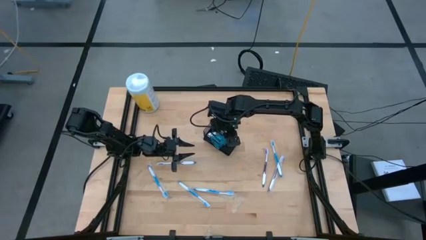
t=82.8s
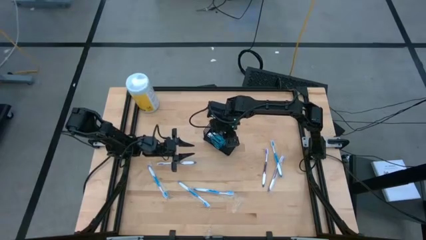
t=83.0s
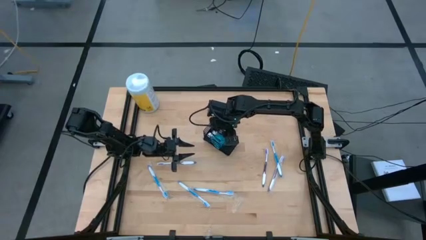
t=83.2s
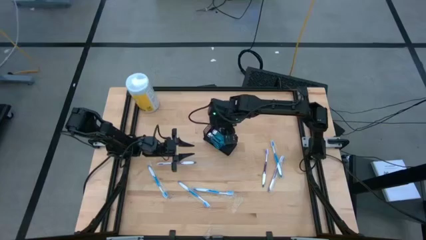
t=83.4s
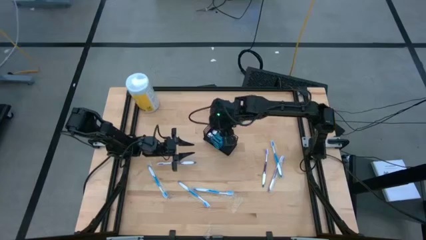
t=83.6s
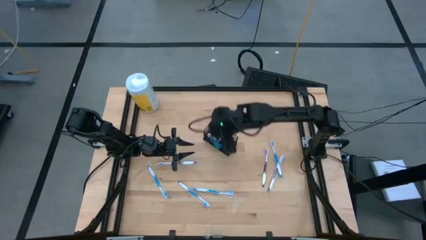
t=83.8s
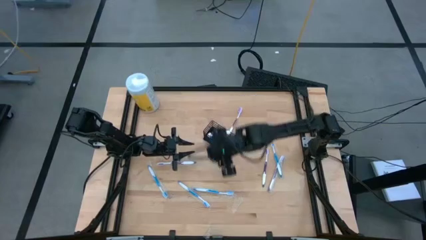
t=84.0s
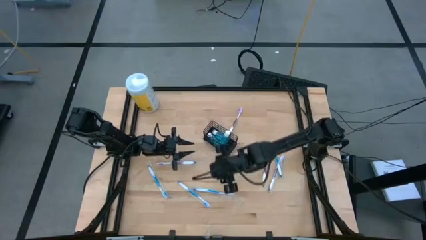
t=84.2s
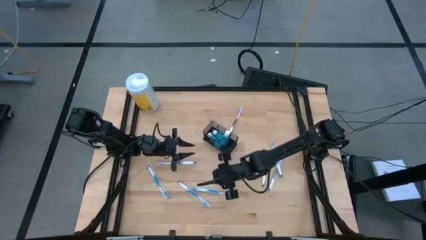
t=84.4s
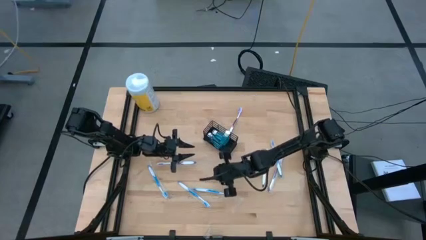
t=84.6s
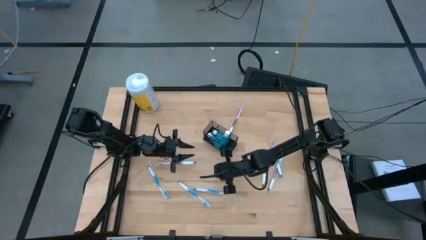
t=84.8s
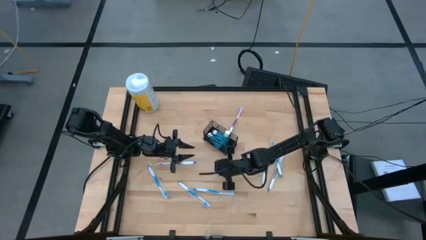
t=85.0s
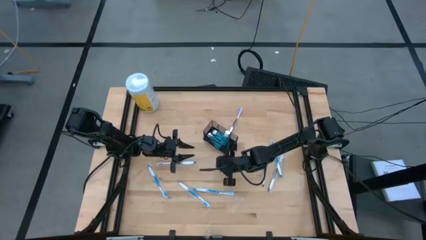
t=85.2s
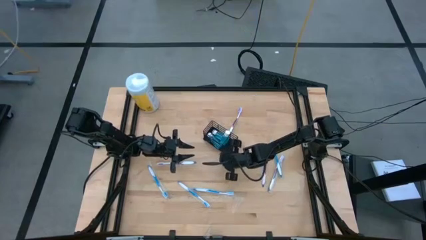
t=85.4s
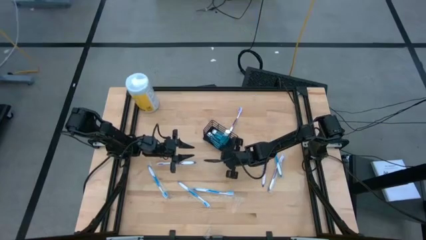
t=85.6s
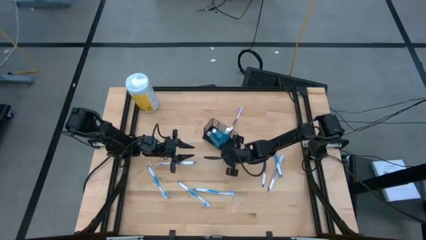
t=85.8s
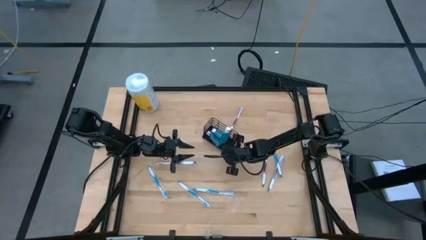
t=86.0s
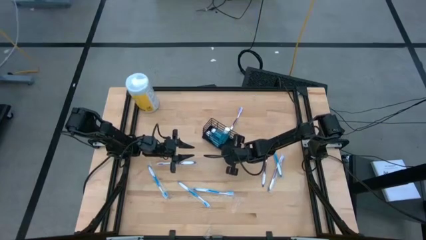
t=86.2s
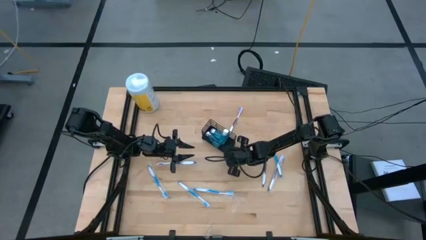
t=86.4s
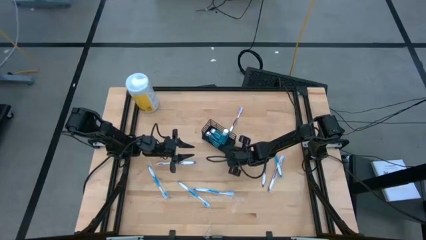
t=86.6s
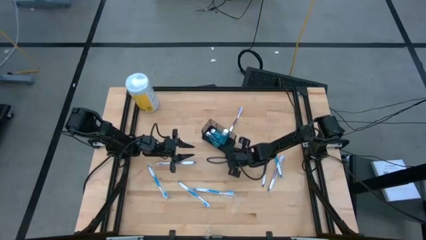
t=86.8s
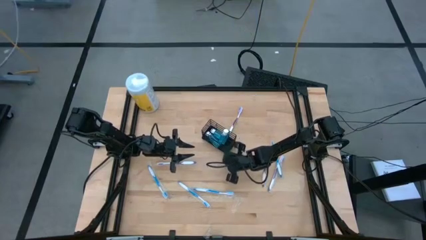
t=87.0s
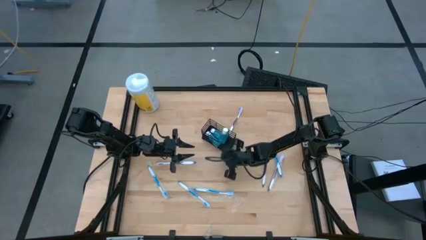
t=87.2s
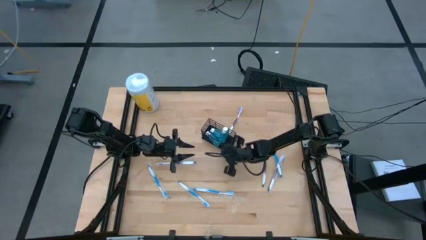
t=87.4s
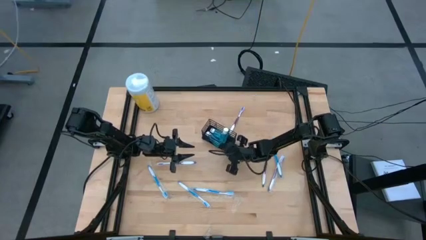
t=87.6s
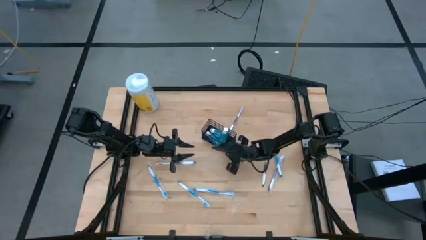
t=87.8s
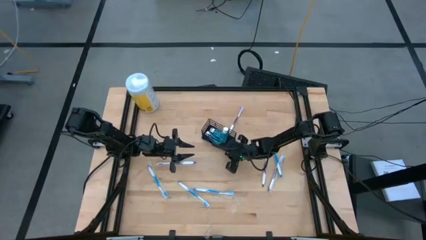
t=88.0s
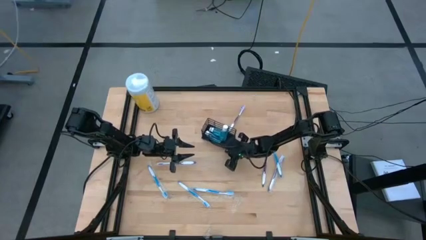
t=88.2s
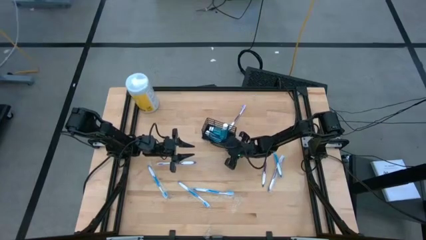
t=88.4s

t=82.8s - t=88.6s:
Task: Pick & Place toothbrushing station
Adjust the wire organizer

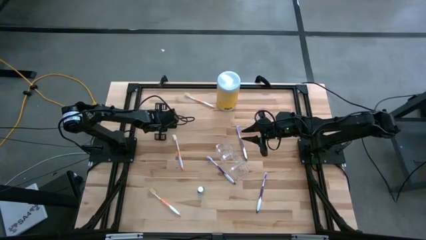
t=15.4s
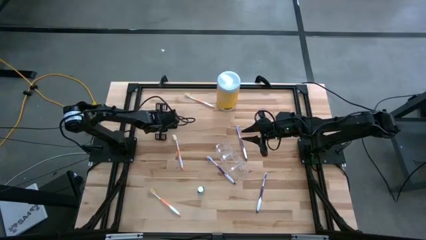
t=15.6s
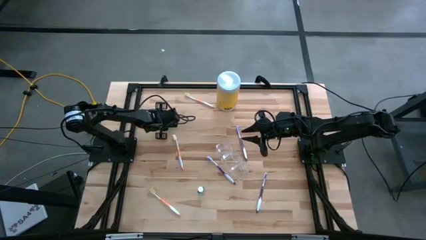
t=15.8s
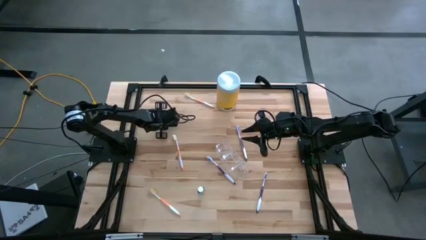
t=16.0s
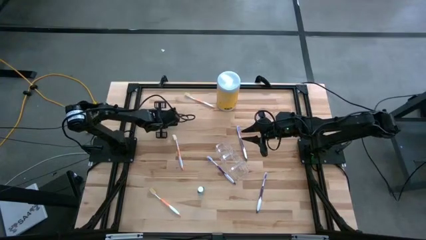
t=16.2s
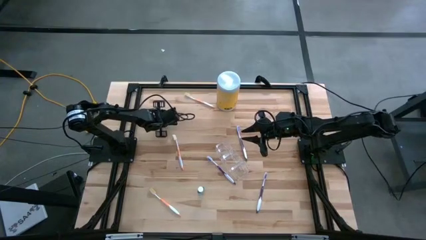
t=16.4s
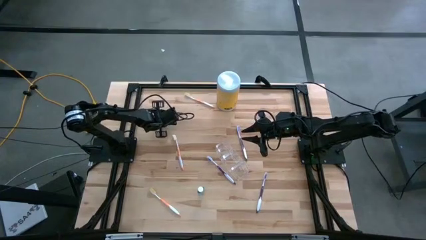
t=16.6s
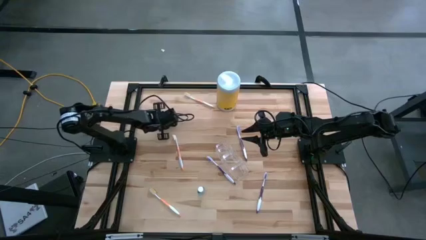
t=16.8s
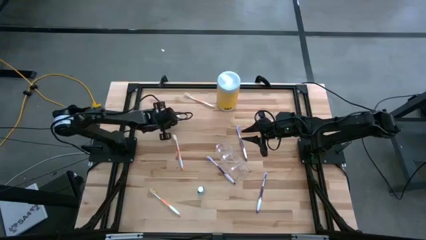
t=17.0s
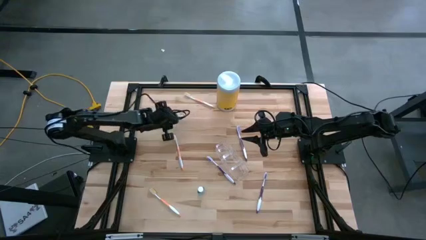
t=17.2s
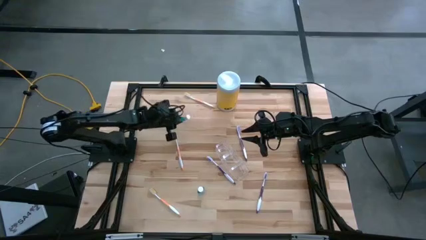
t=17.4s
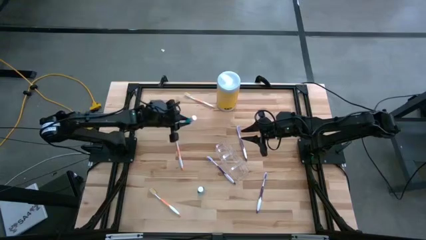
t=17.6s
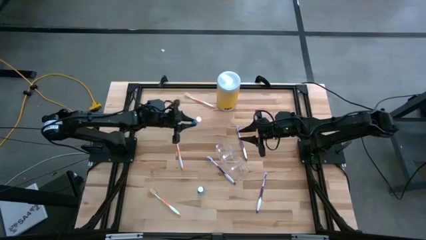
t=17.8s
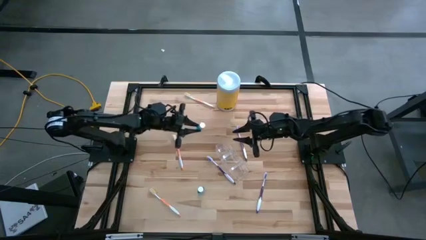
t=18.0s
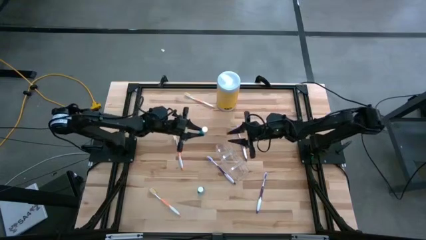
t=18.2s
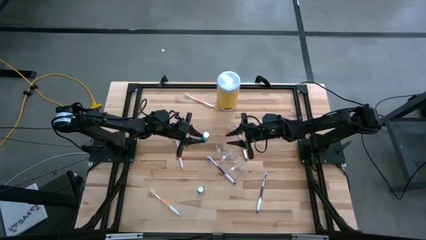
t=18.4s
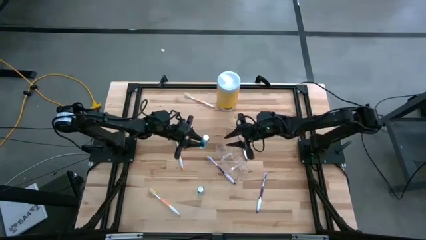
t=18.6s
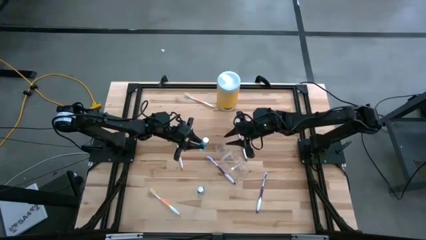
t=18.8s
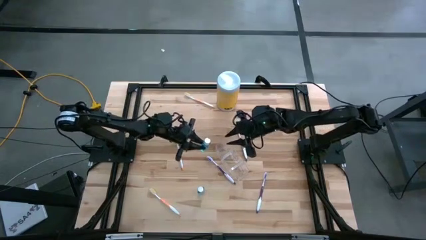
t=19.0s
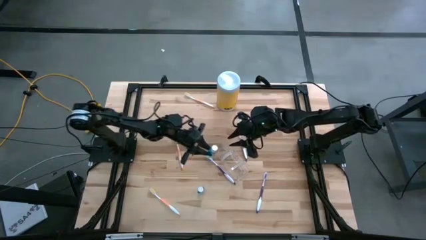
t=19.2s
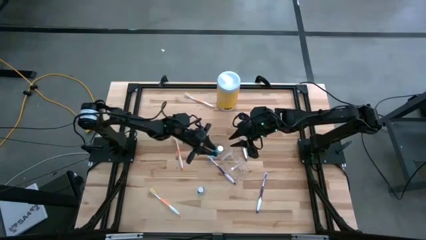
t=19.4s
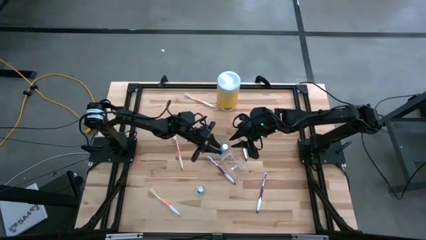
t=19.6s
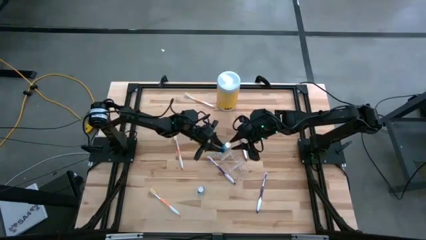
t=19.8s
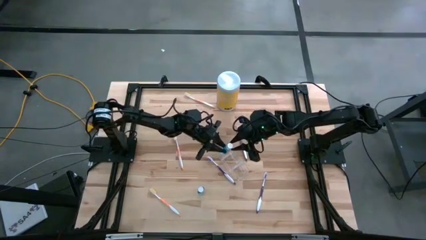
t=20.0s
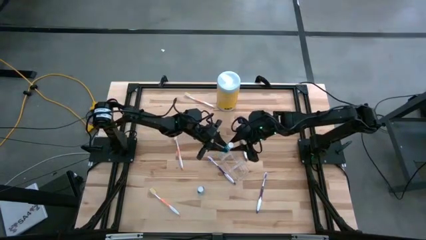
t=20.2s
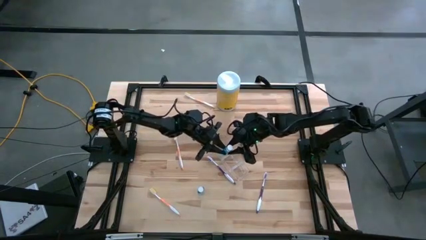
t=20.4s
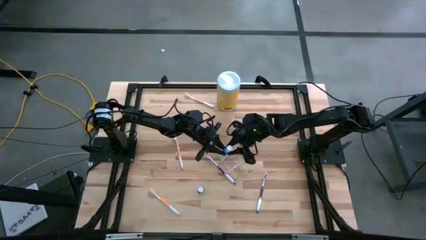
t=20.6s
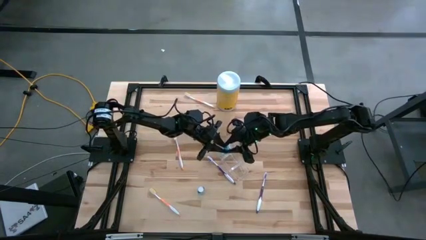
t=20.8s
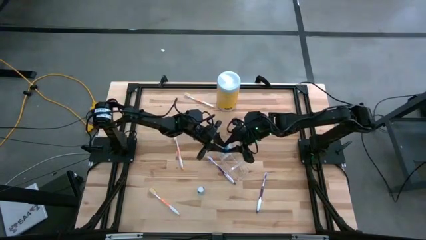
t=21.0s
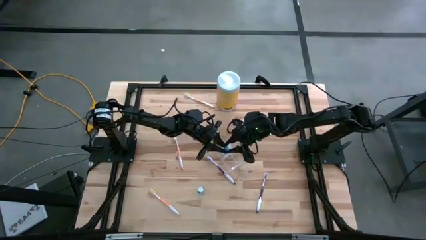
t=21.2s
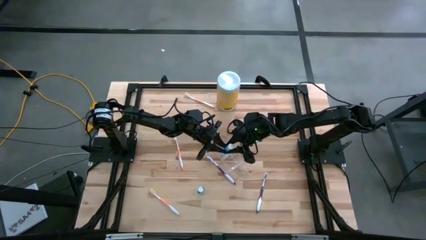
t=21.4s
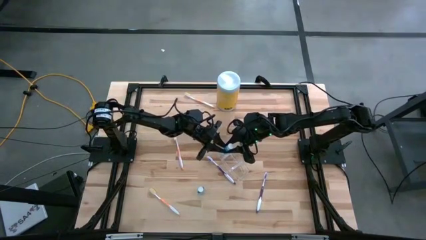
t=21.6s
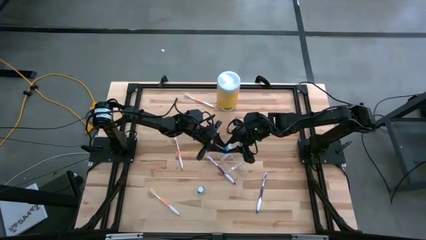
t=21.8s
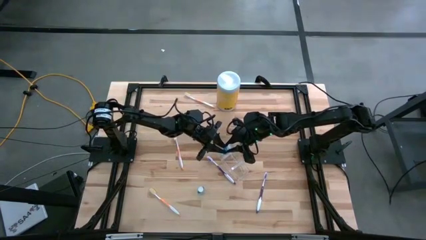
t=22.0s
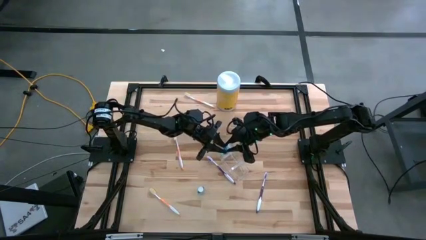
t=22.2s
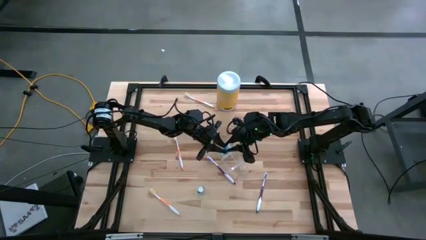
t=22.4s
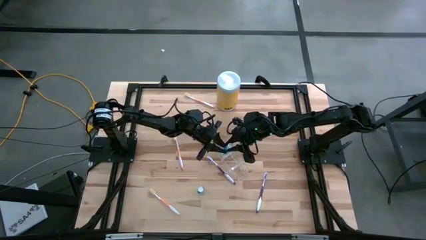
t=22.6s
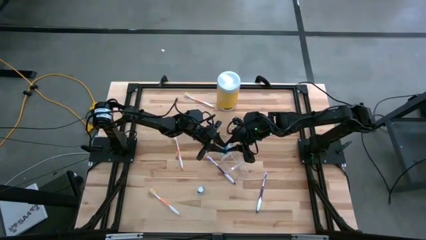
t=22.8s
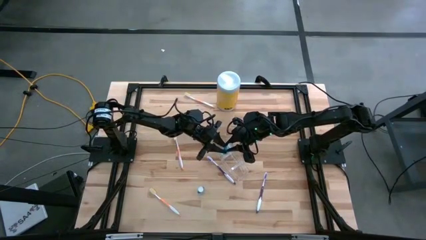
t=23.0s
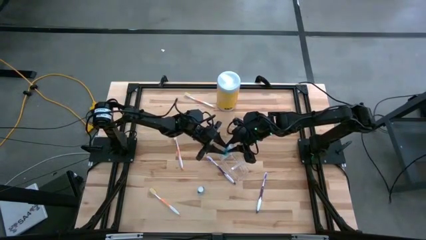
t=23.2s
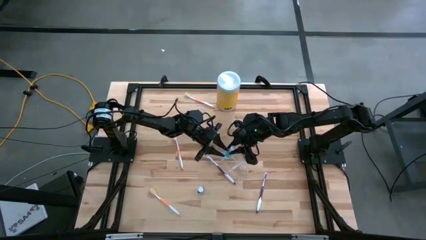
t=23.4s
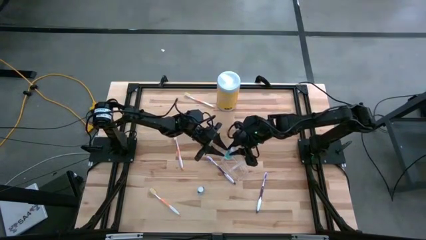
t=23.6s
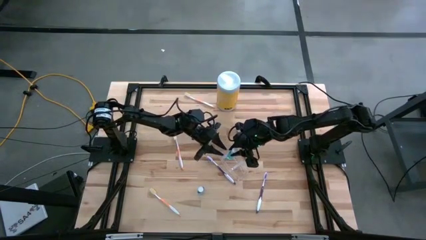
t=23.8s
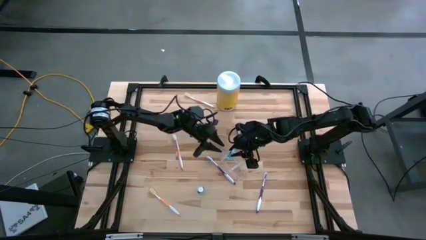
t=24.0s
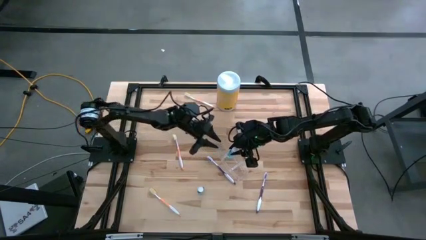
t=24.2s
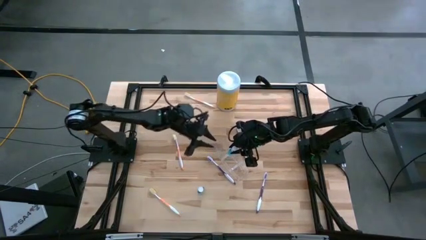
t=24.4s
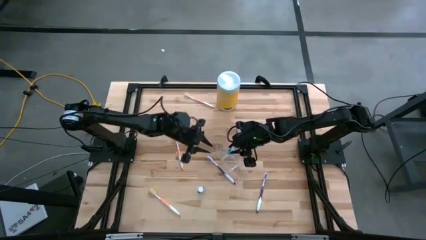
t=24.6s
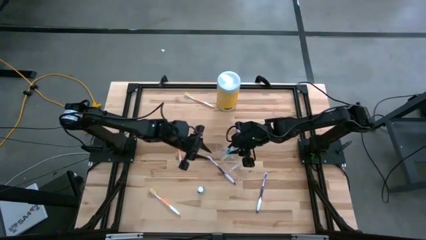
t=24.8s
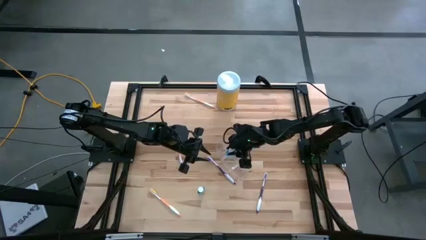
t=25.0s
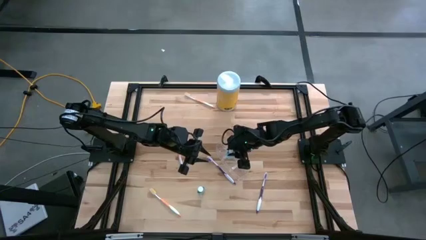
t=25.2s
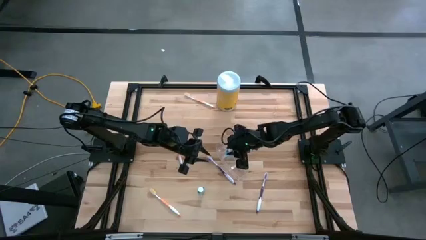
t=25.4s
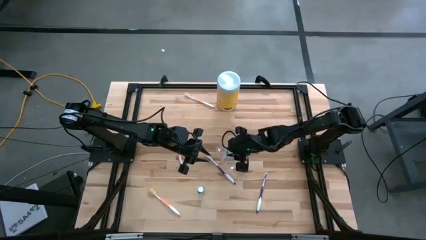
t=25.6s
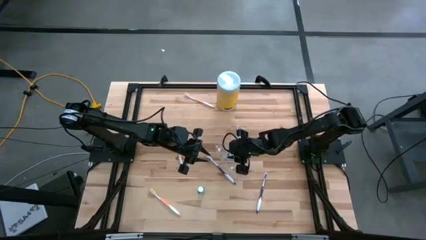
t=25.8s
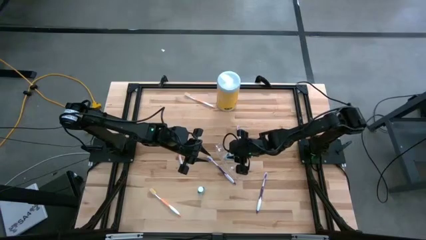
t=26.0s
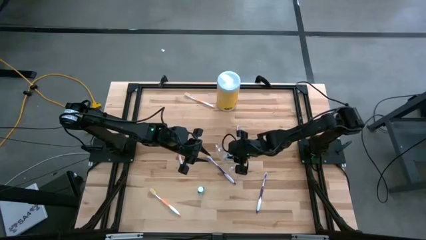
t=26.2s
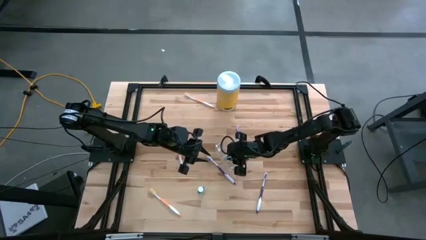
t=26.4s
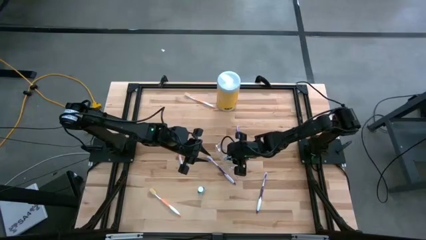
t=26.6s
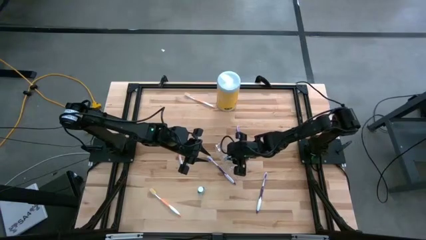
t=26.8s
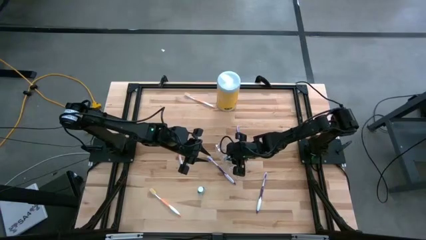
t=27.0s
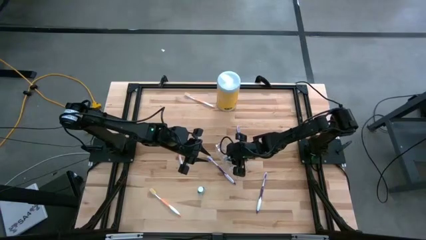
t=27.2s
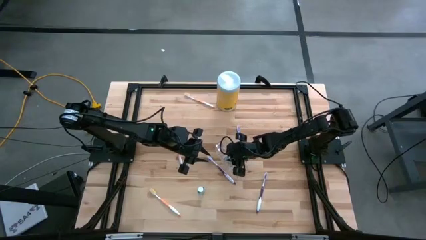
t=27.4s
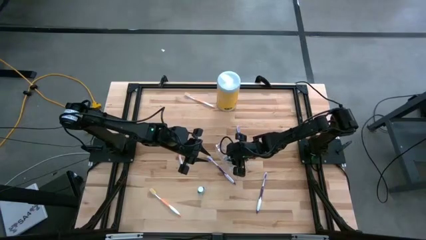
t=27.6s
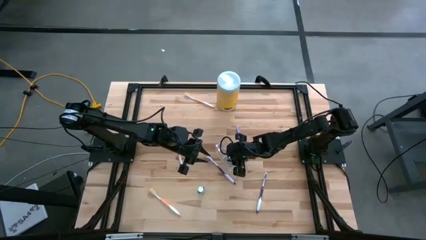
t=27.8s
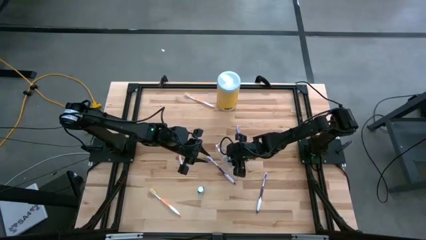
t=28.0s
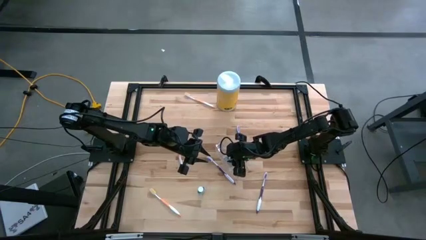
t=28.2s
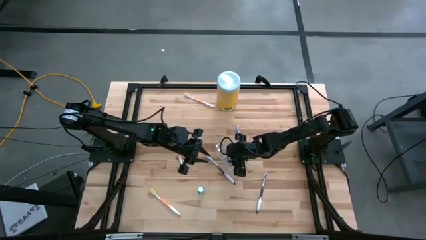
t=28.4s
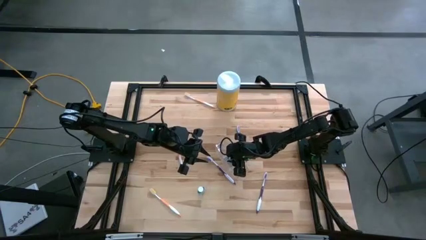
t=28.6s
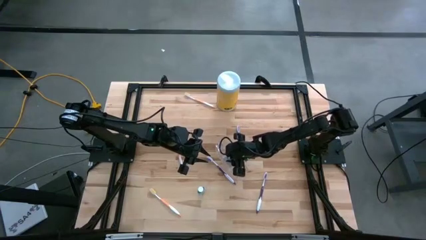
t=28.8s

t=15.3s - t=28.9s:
Task: Pick & Place toothbrushing station
Put the top mouthwash into the transparent organizer
